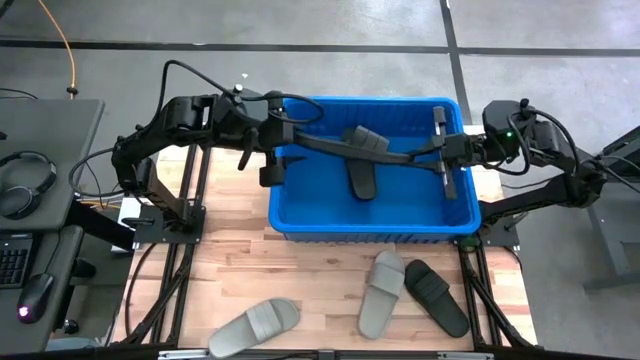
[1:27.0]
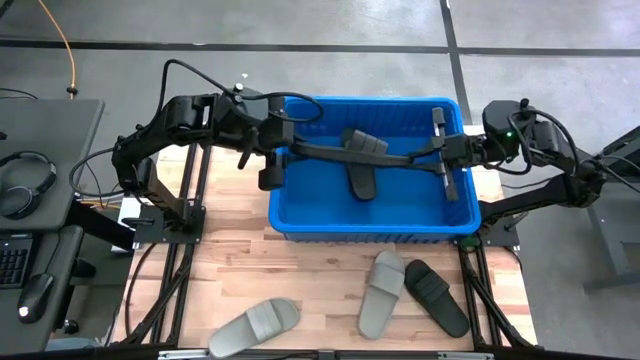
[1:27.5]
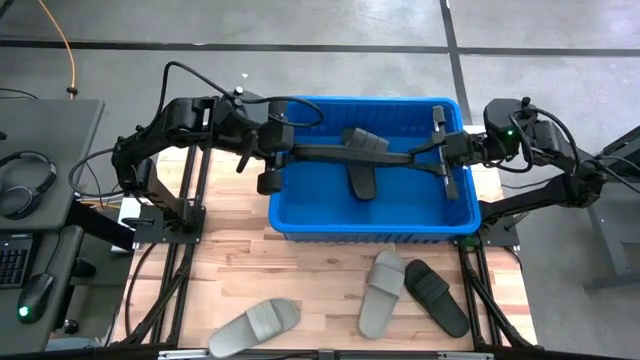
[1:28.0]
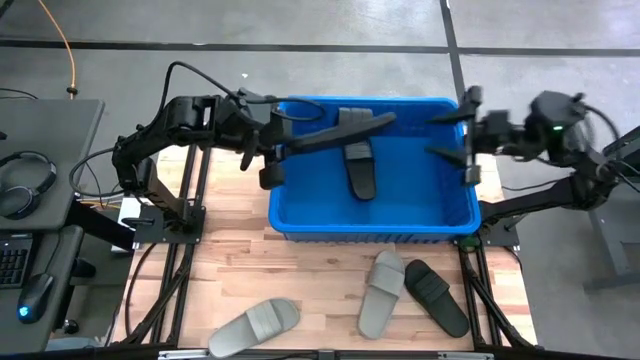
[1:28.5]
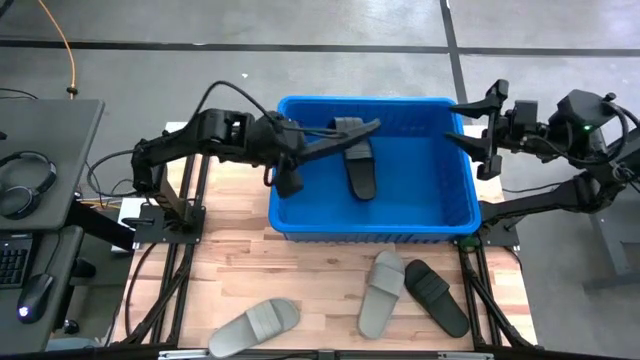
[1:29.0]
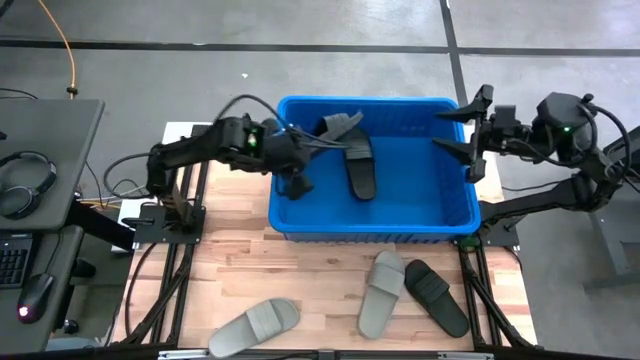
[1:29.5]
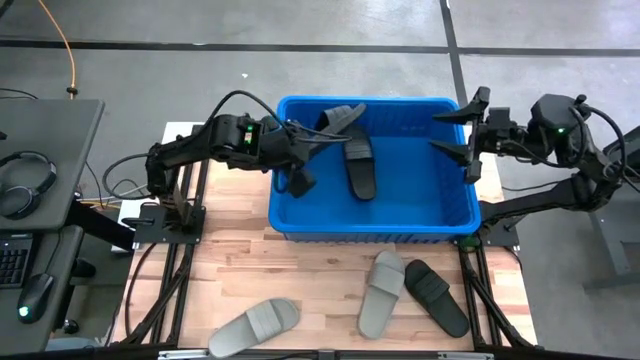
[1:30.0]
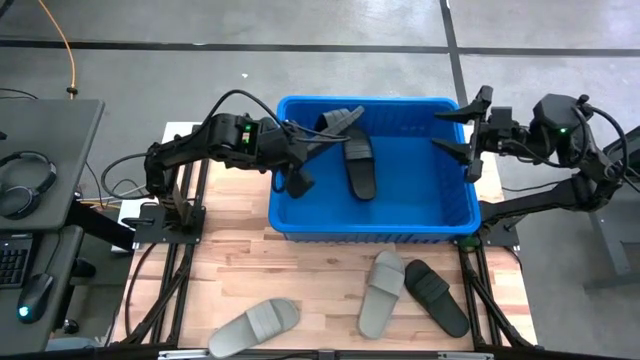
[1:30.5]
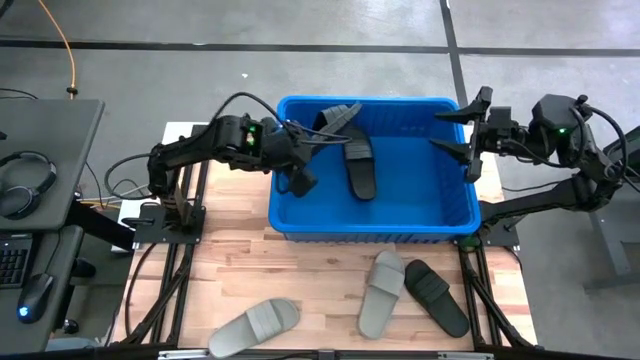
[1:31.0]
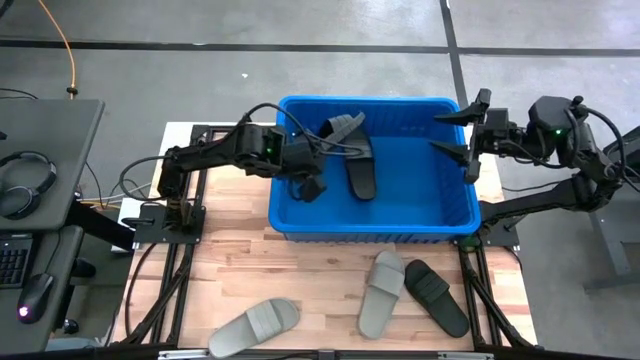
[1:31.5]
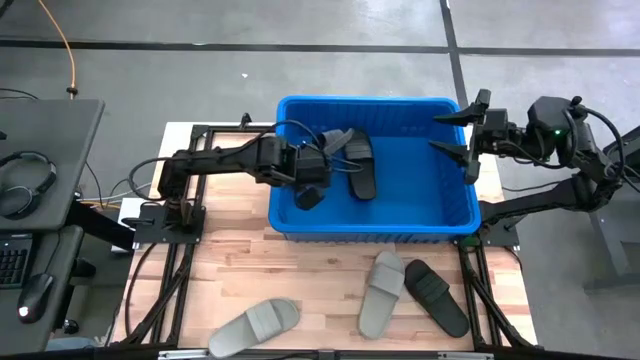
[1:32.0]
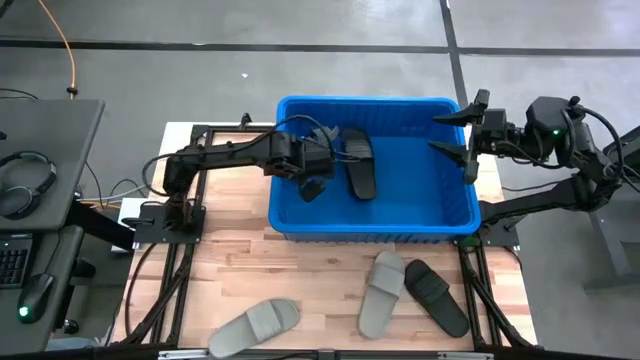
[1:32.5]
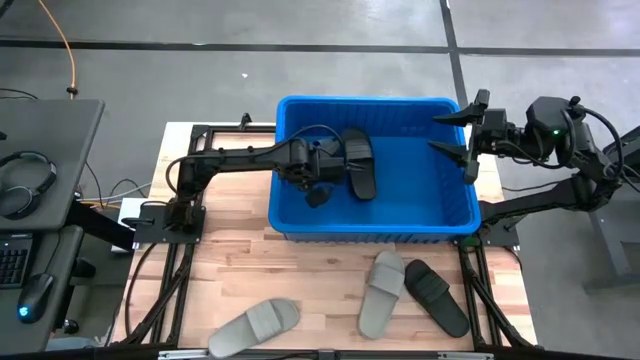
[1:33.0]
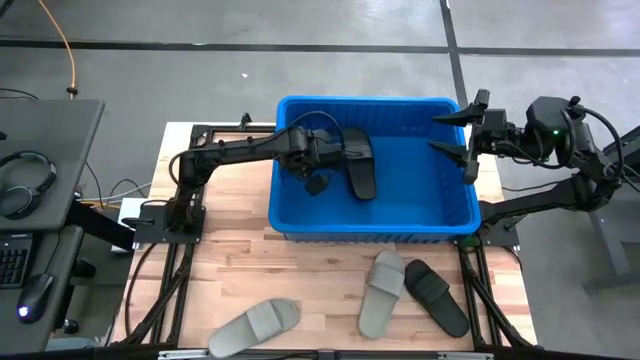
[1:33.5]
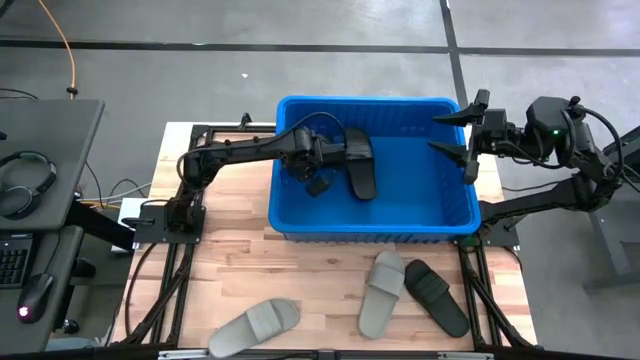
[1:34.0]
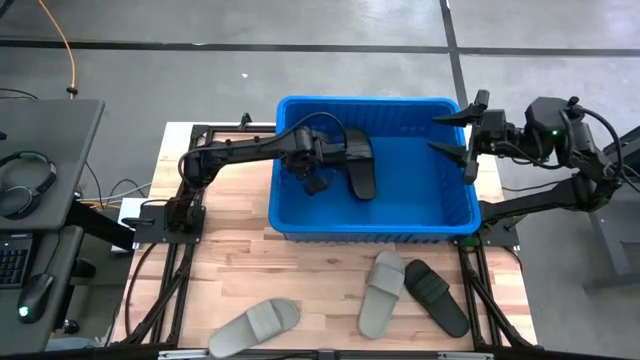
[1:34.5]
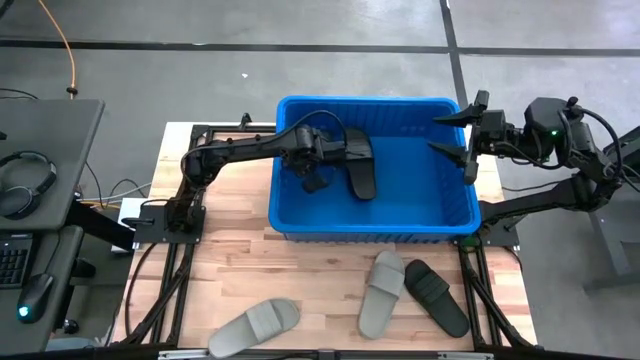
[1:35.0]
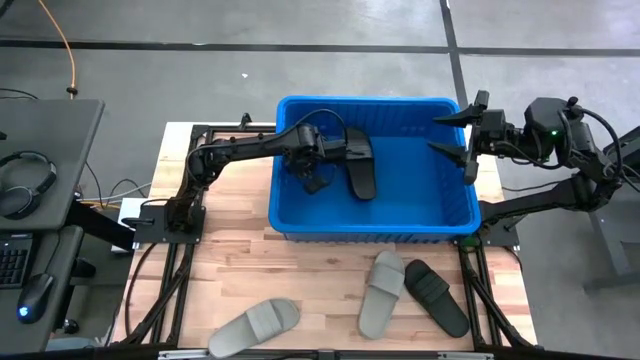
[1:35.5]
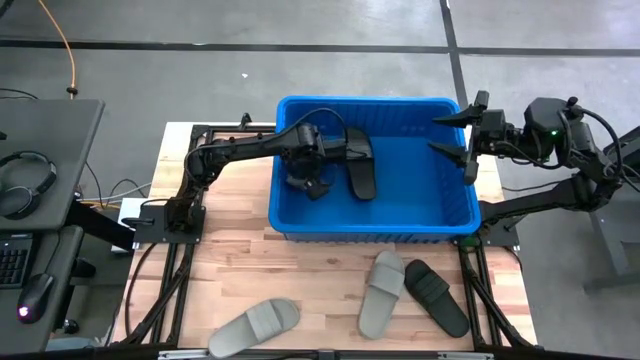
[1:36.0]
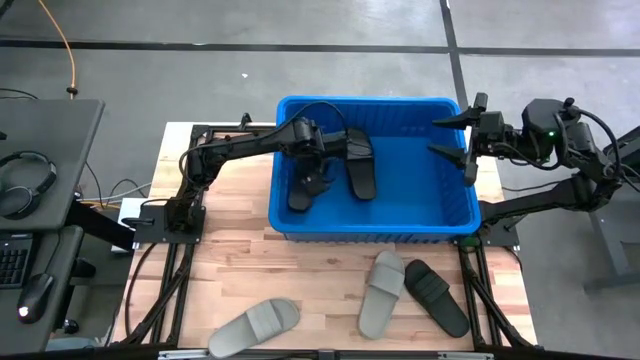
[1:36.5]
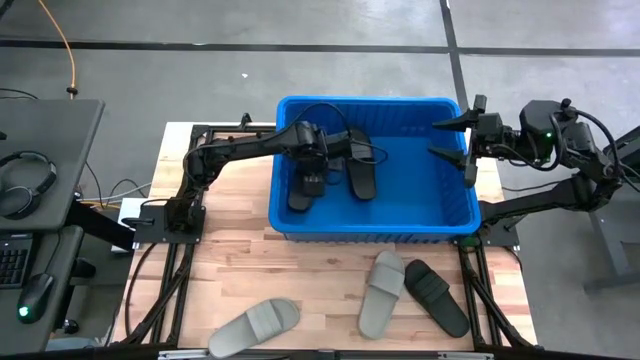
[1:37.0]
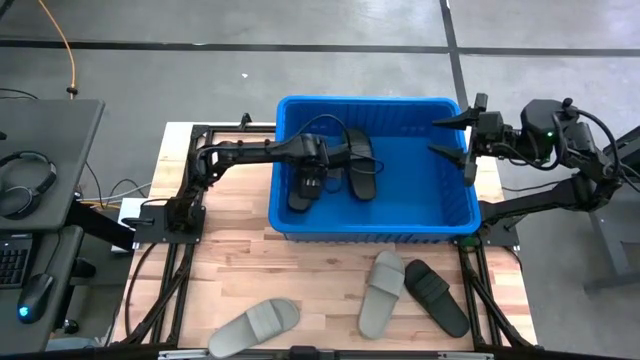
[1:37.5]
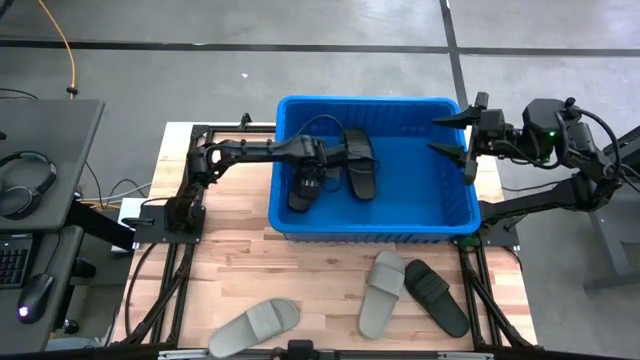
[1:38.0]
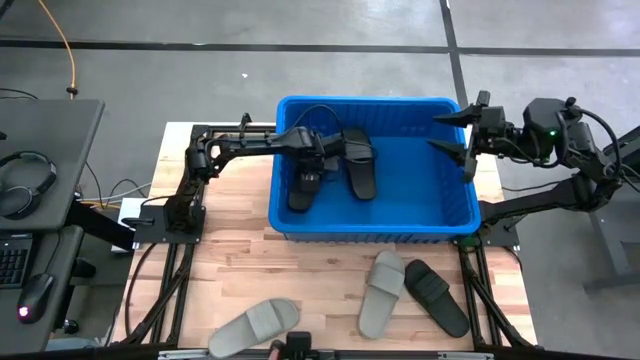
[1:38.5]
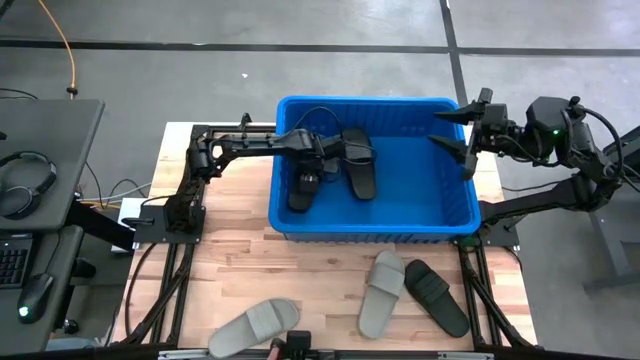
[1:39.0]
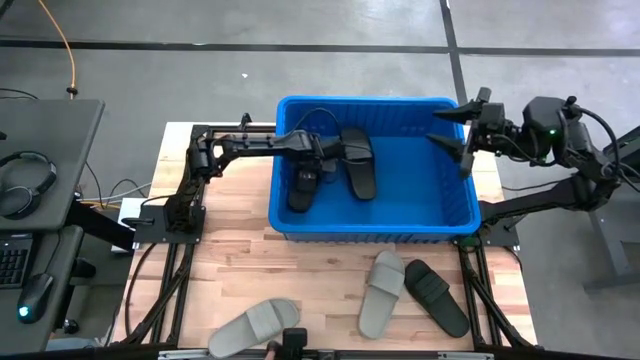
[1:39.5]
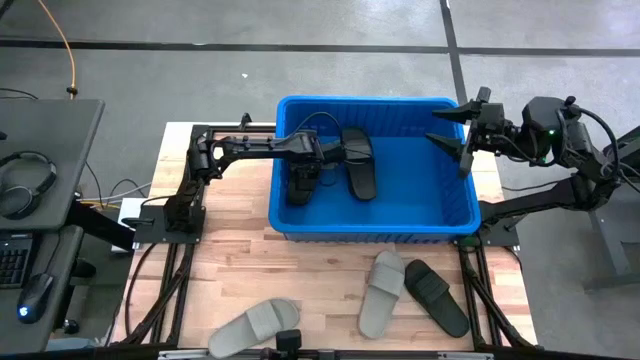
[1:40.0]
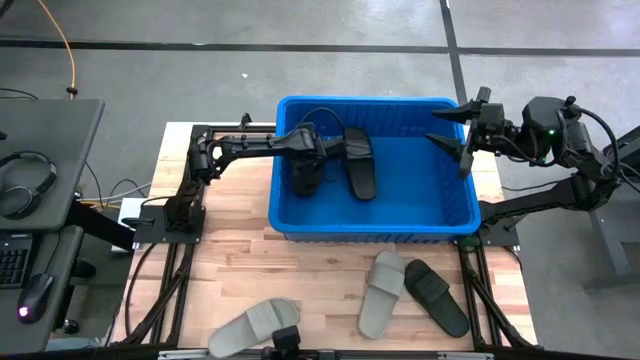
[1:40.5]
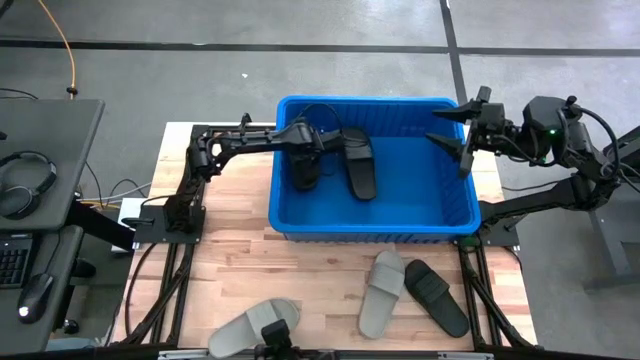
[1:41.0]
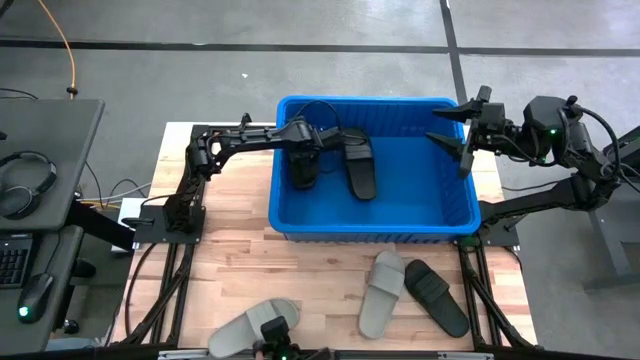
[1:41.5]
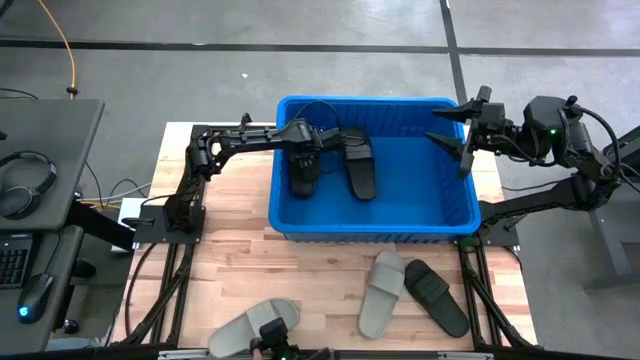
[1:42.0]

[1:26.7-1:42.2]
Task: Pick and place slides into bin
Put the black slides into the blue bin

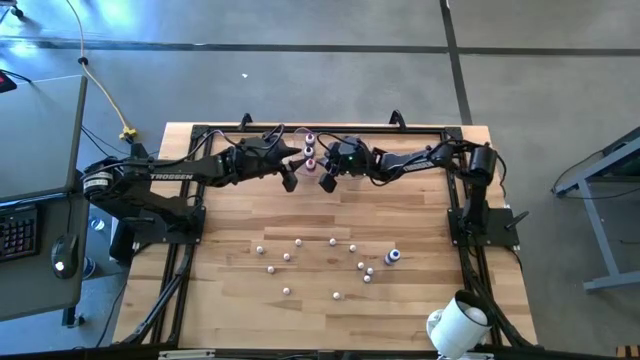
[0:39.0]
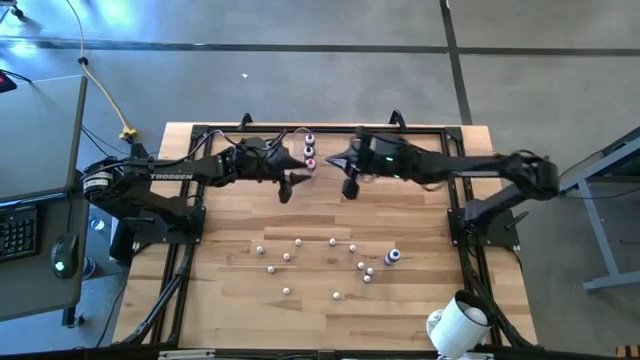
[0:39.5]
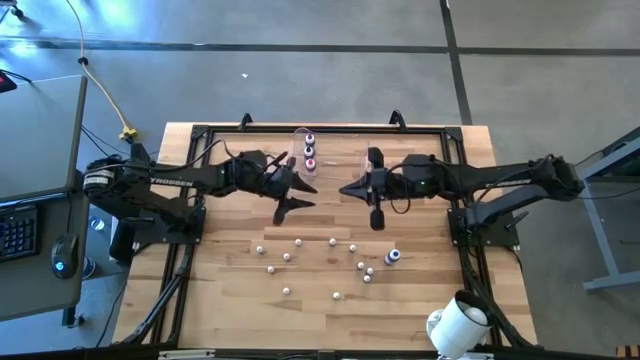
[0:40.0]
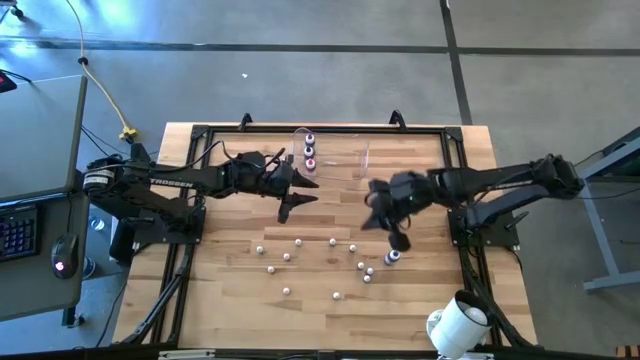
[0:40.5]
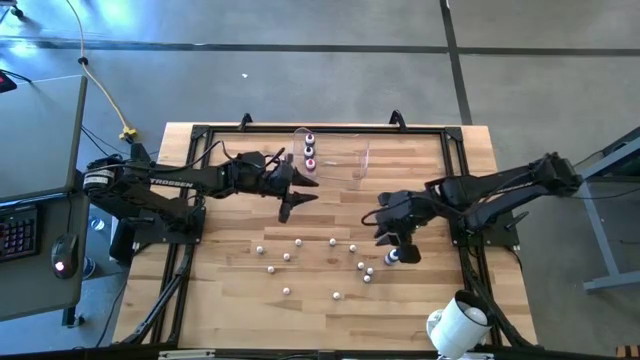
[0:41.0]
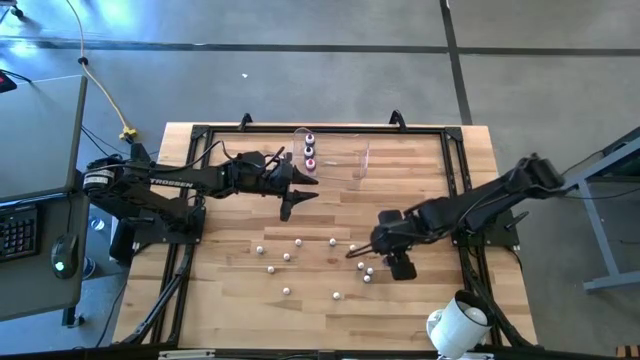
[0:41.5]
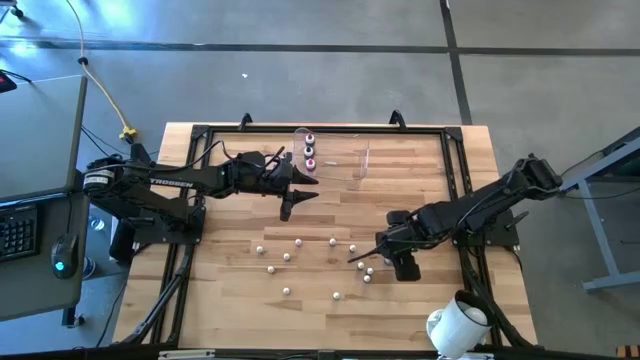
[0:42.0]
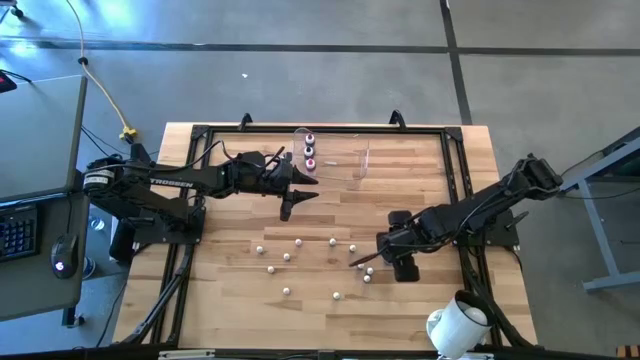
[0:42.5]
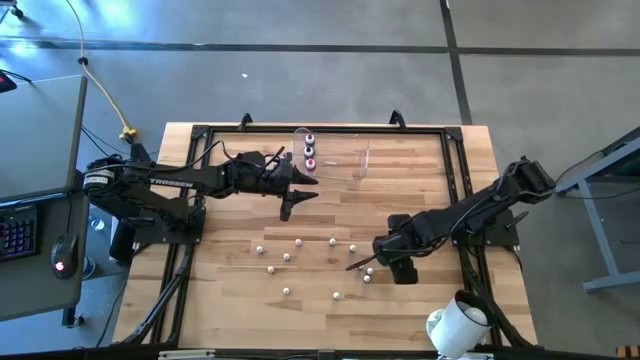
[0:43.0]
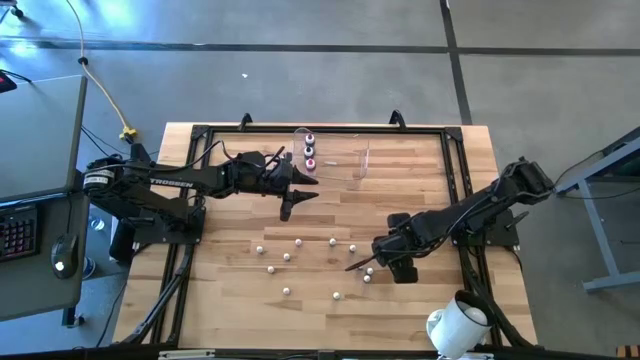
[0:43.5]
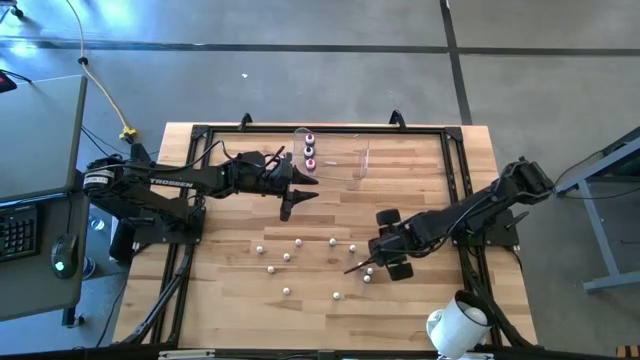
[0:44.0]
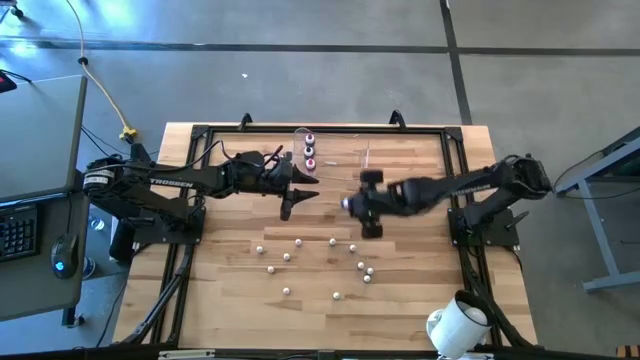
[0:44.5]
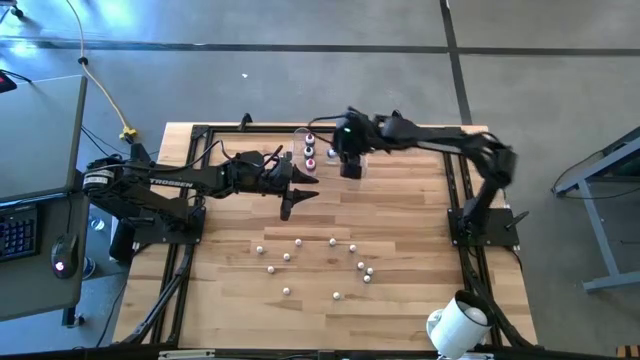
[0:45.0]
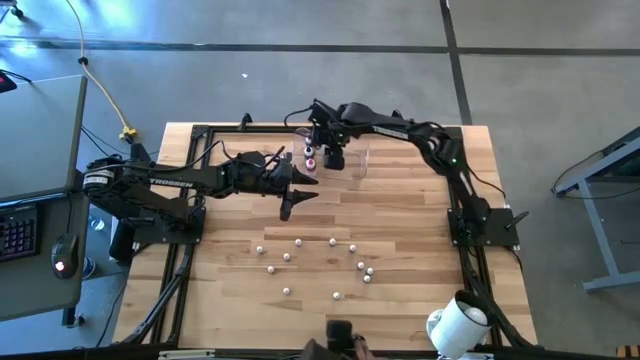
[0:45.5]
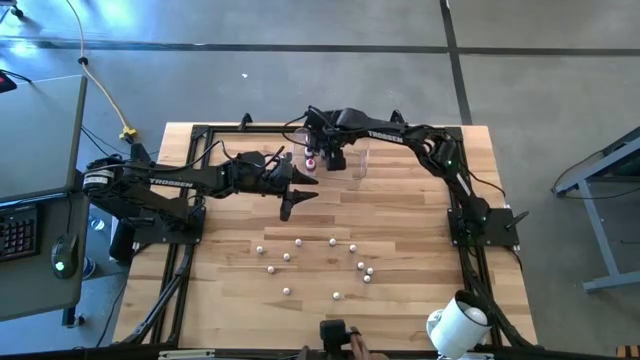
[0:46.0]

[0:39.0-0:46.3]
Task: Pick & Place food coloring
Put the blue food coloring into the transparent bin
